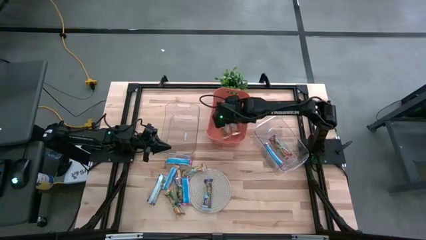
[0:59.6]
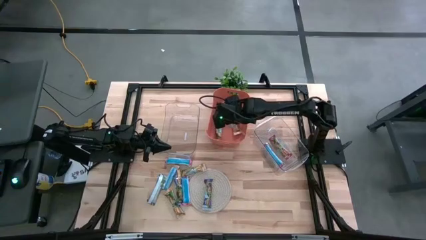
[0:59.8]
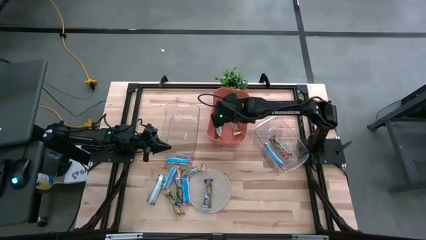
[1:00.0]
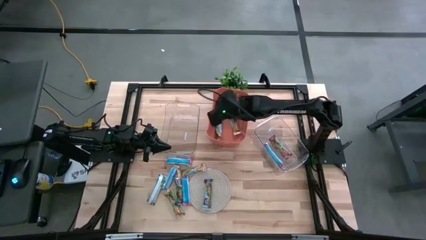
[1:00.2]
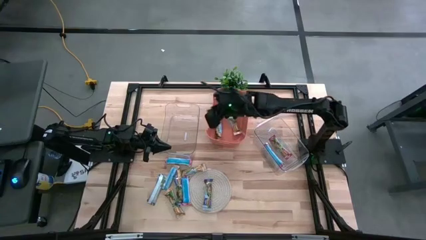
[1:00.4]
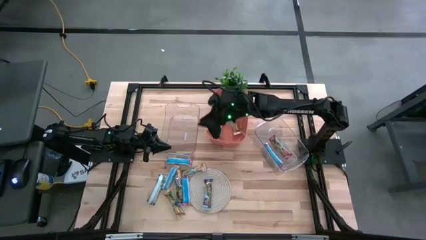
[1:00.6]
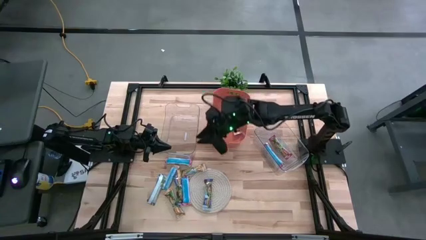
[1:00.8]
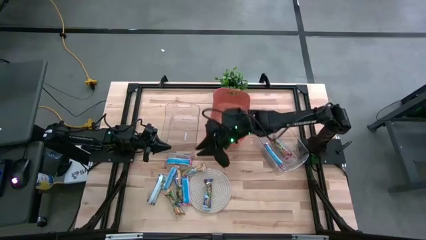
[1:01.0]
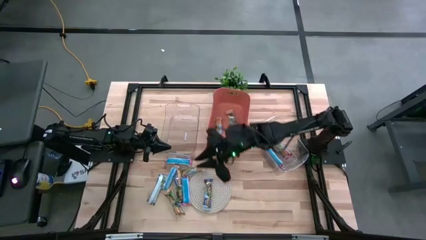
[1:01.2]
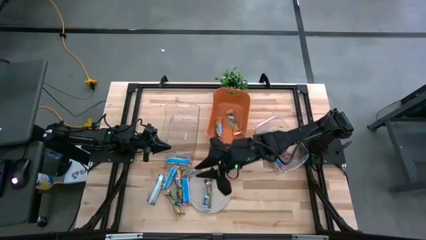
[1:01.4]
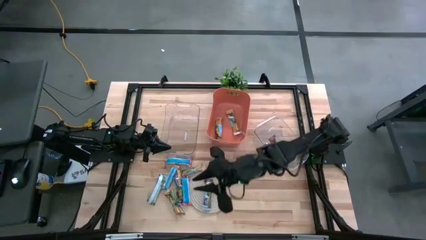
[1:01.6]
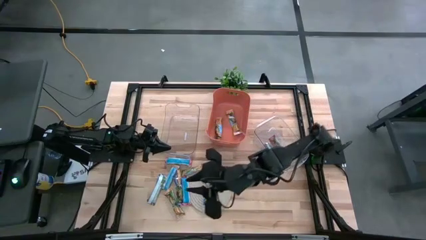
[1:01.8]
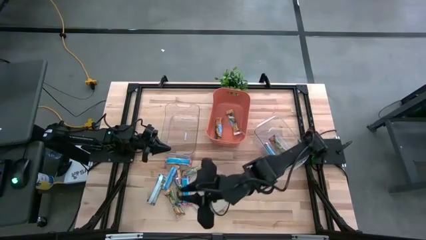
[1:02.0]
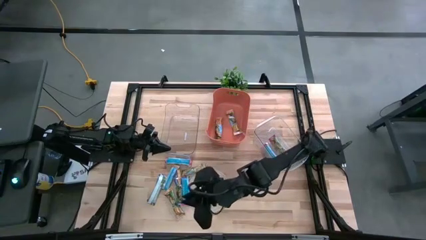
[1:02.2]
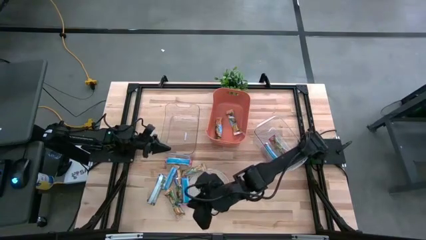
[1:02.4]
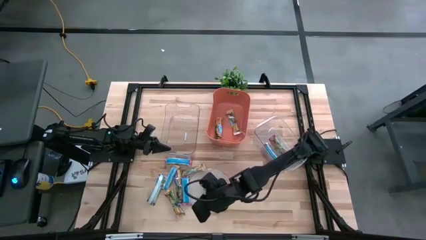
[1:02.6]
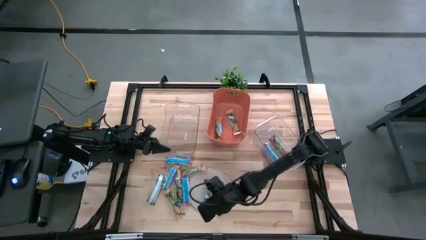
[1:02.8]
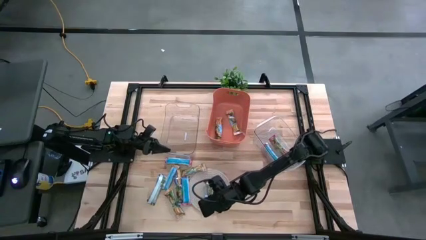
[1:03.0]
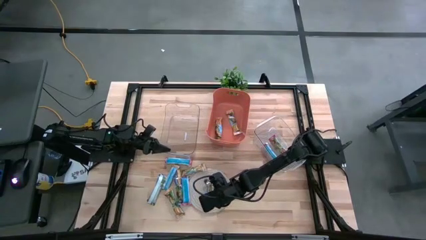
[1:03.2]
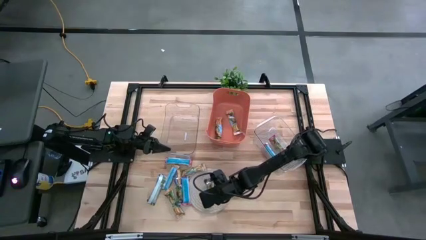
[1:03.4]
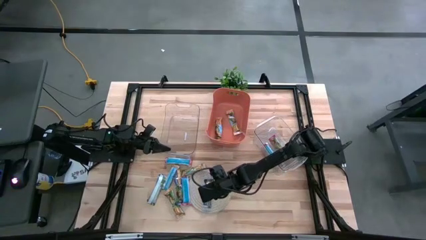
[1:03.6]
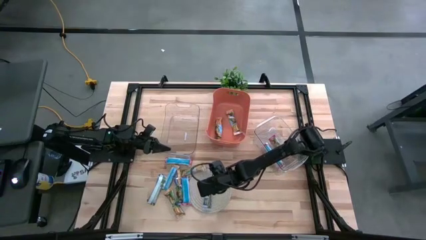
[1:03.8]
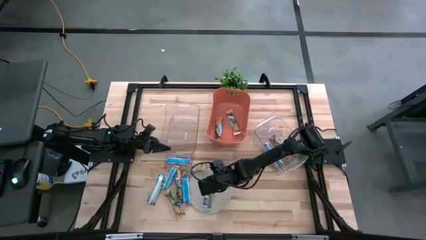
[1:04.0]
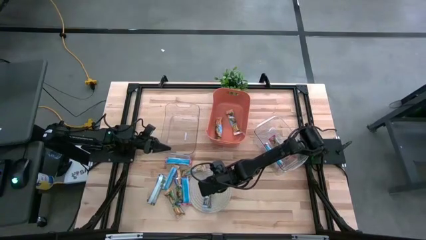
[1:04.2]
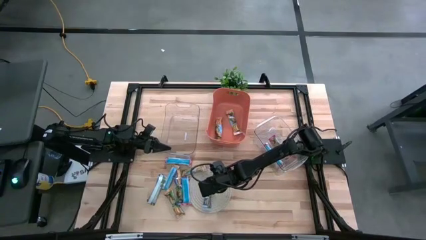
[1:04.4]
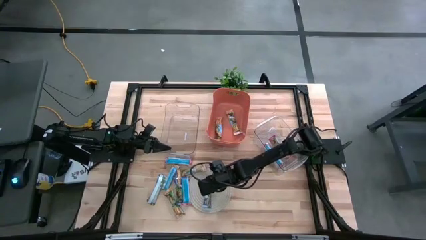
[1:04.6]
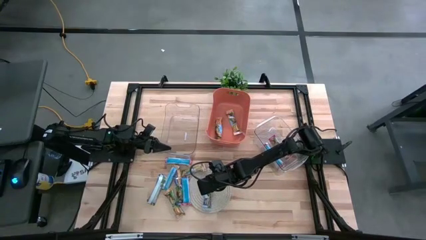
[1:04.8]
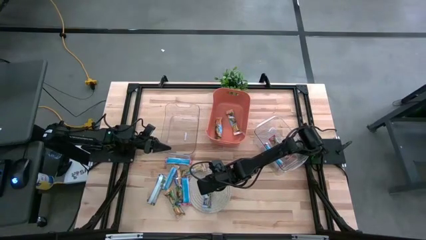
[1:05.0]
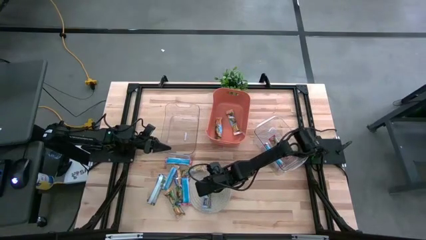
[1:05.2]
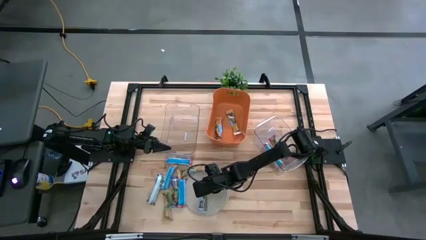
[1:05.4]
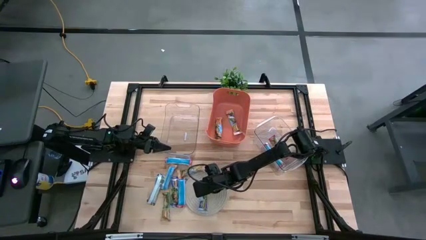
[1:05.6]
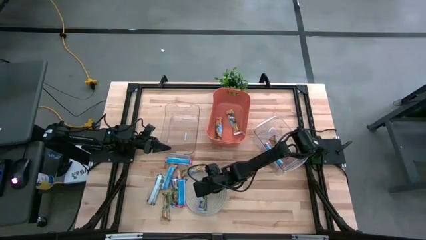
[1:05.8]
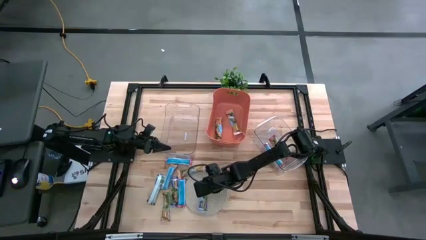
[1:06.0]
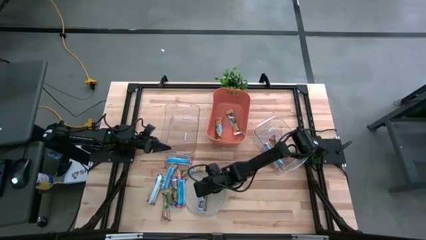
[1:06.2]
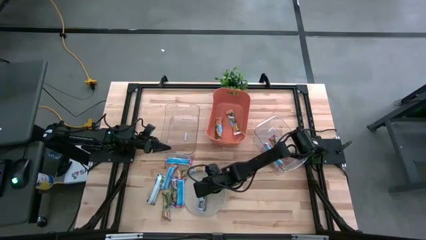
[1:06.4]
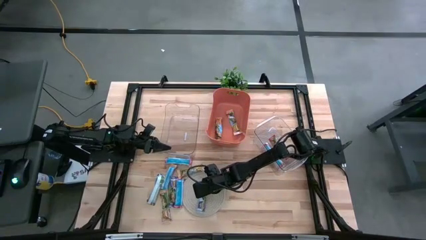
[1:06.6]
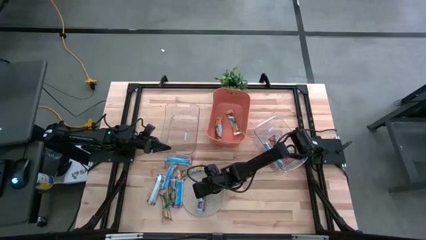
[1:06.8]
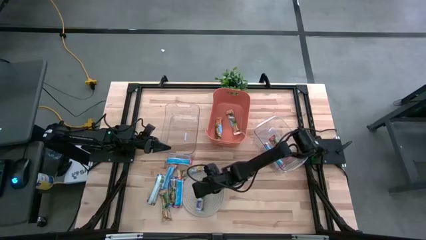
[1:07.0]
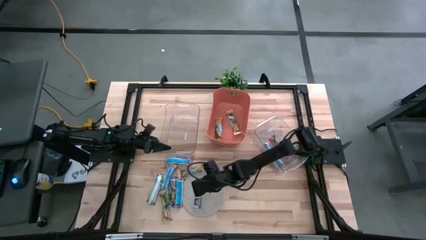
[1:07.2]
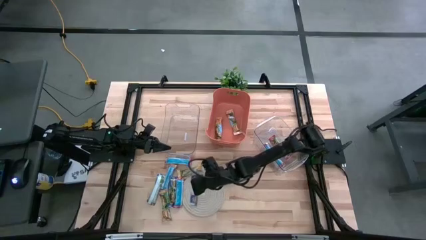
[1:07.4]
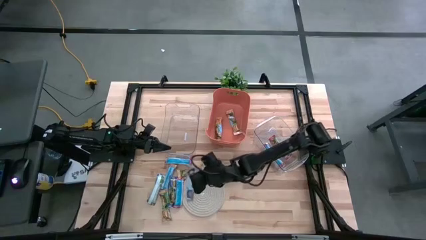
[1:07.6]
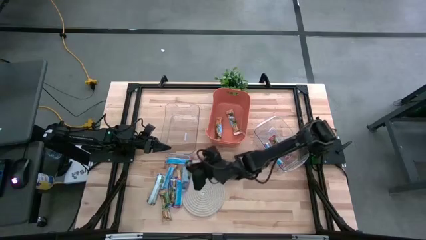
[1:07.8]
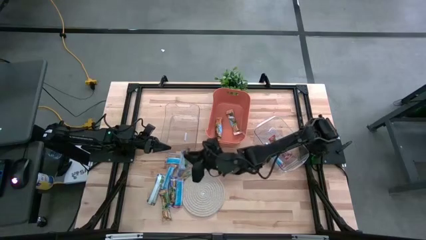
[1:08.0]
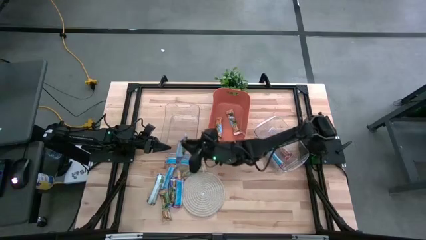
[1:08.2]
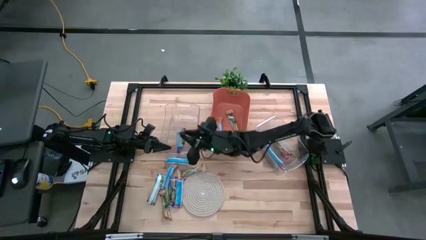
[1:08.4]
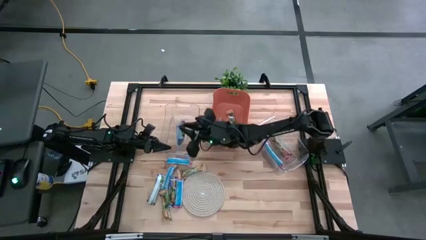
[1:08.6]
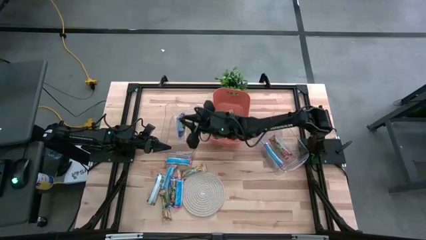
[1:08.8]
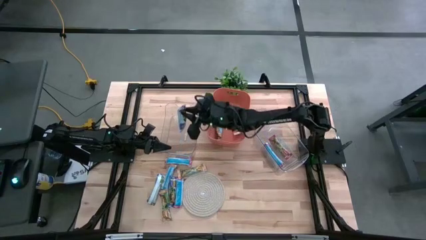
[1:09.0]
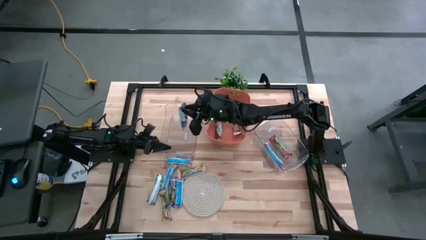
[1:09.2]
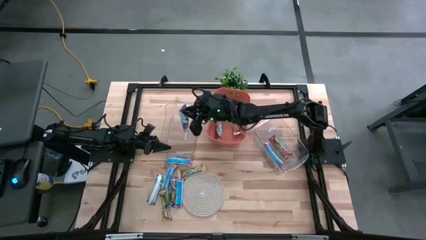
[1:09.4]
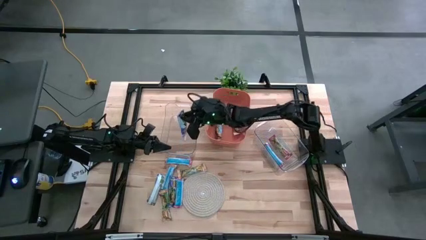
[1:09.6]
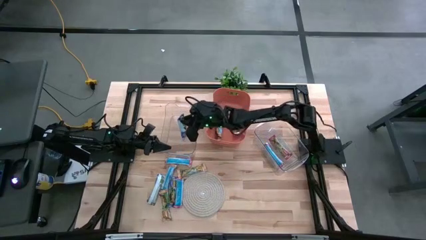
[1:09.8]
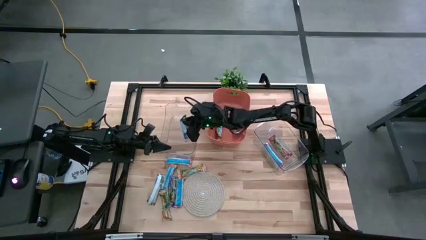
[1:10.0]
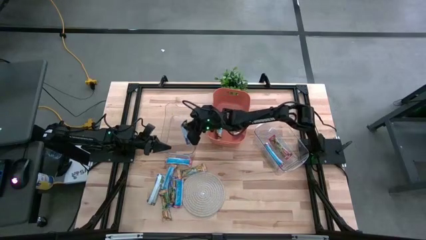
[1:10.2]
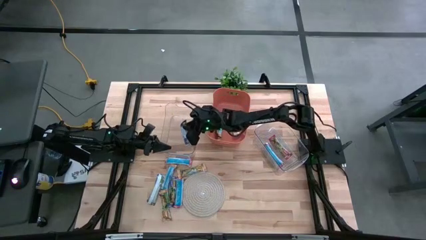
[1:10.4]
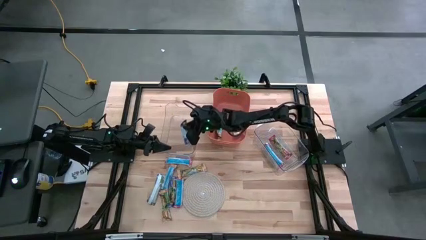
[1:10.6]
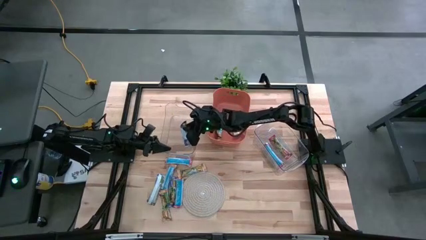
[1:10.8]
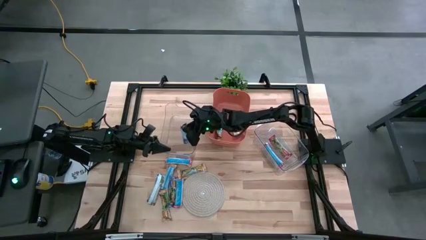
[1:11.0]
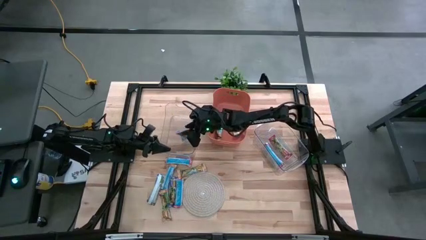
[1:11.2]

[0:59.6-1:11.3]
Task: Pick and place Granola Bars by type
Put the blue granola bar into the left transparent bin
